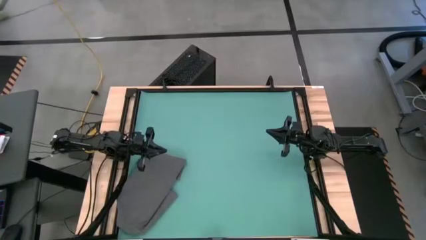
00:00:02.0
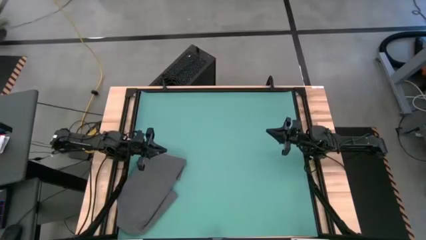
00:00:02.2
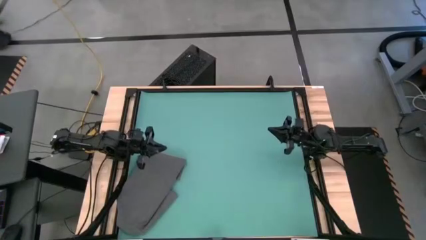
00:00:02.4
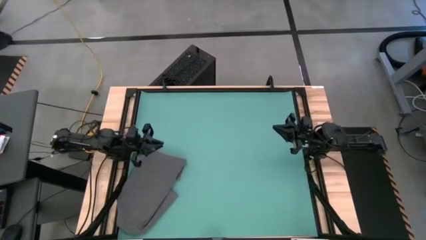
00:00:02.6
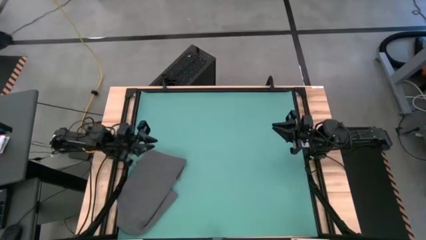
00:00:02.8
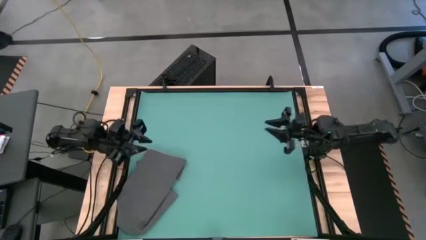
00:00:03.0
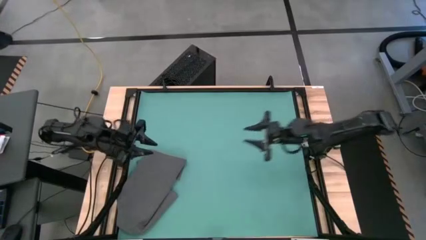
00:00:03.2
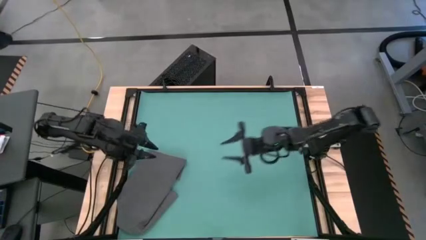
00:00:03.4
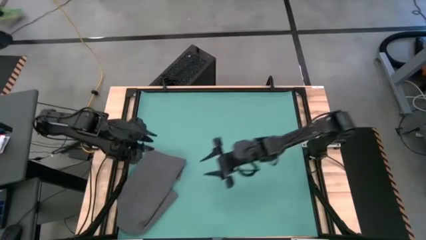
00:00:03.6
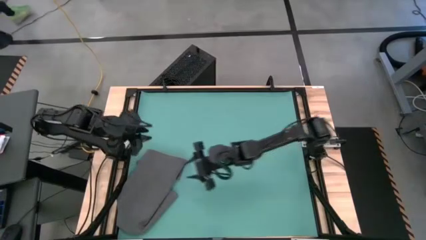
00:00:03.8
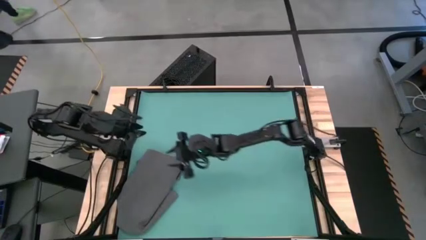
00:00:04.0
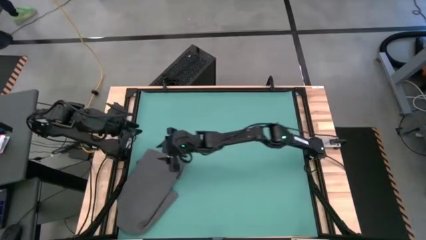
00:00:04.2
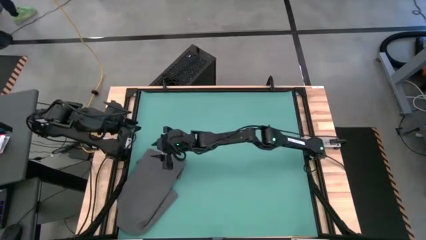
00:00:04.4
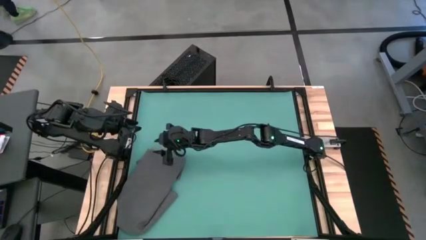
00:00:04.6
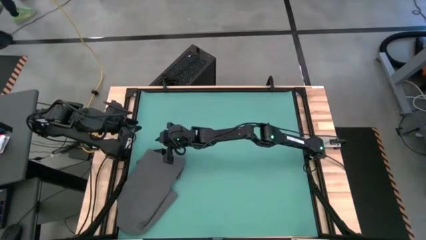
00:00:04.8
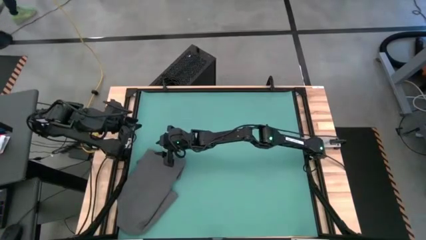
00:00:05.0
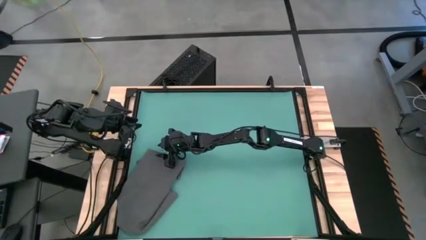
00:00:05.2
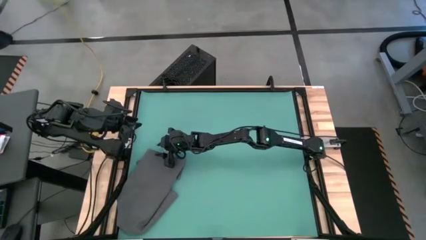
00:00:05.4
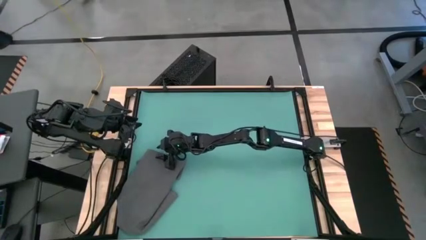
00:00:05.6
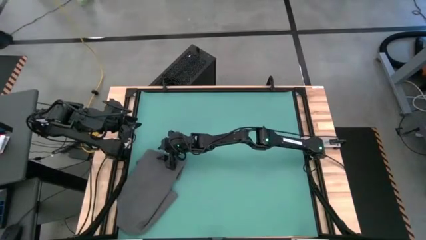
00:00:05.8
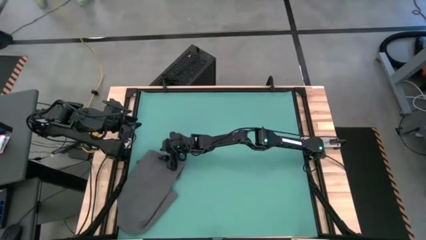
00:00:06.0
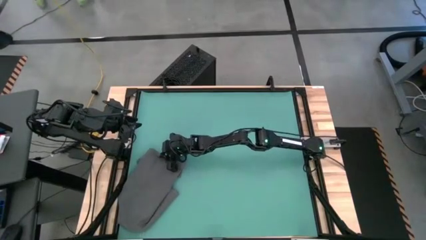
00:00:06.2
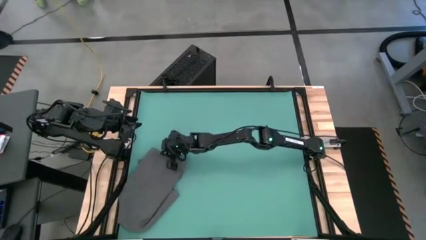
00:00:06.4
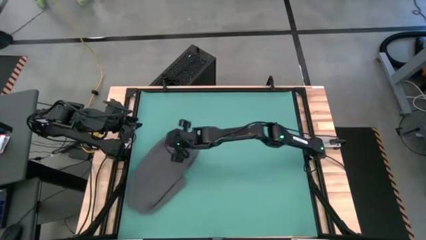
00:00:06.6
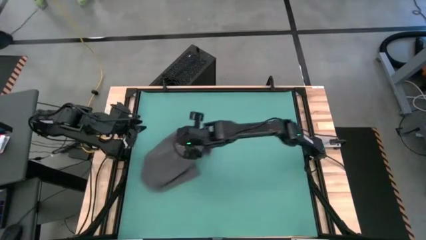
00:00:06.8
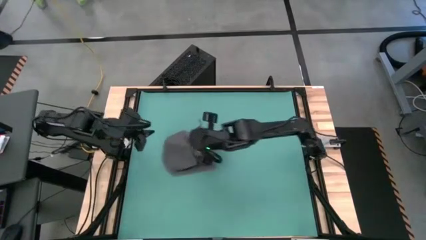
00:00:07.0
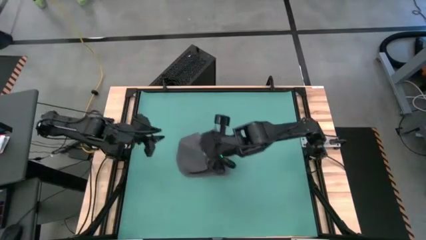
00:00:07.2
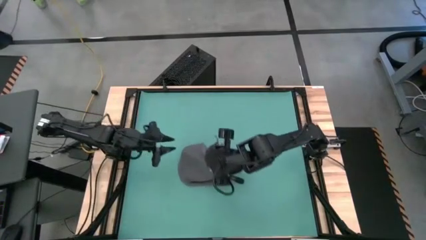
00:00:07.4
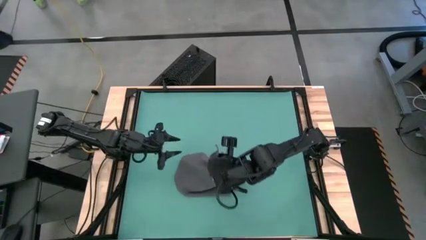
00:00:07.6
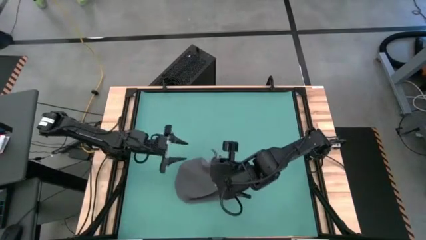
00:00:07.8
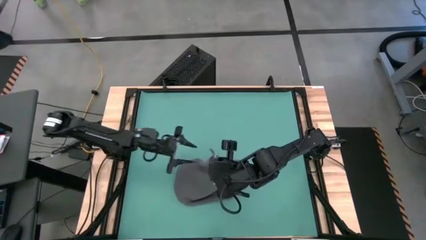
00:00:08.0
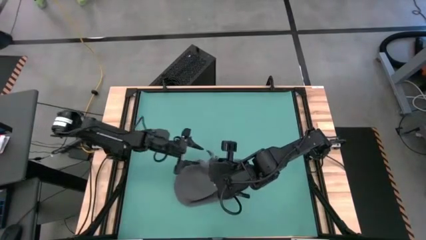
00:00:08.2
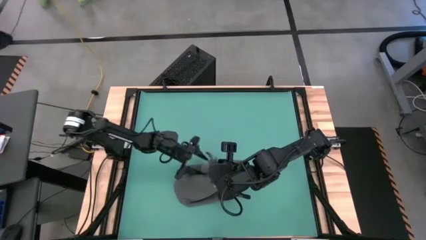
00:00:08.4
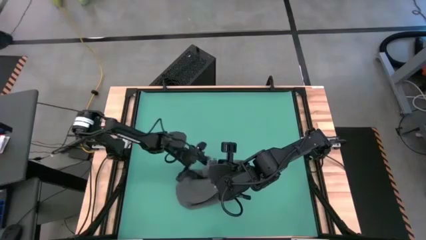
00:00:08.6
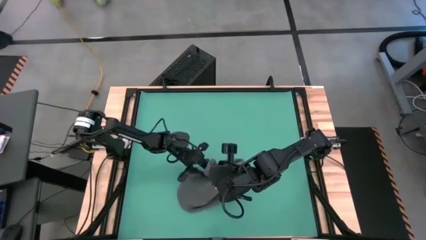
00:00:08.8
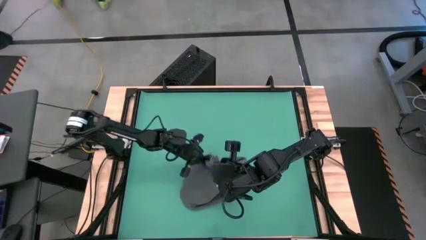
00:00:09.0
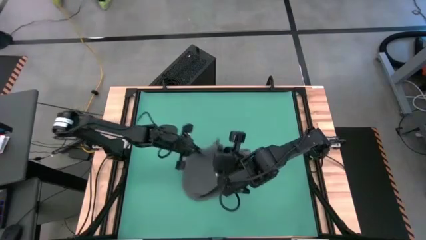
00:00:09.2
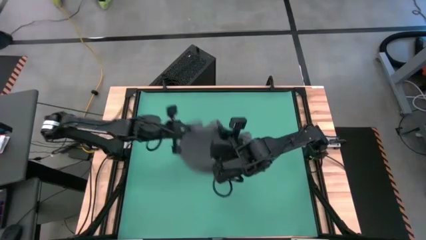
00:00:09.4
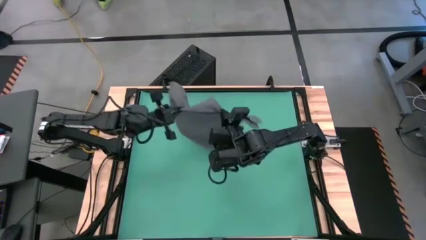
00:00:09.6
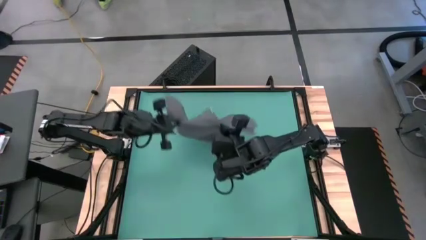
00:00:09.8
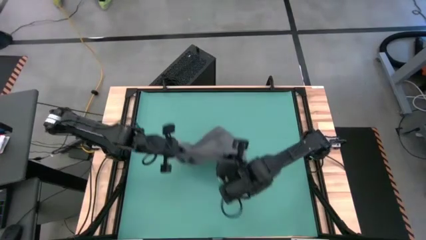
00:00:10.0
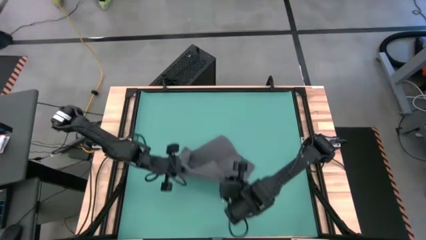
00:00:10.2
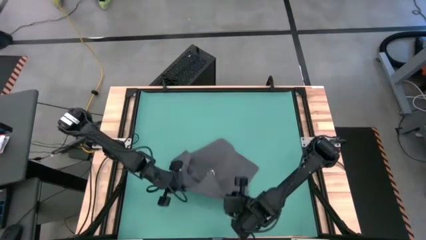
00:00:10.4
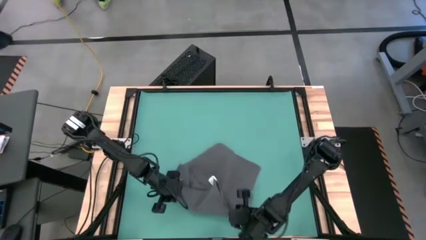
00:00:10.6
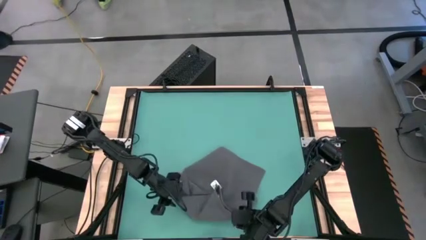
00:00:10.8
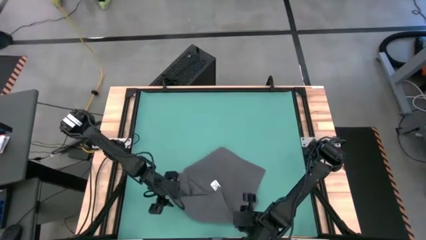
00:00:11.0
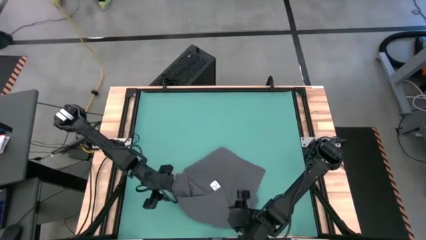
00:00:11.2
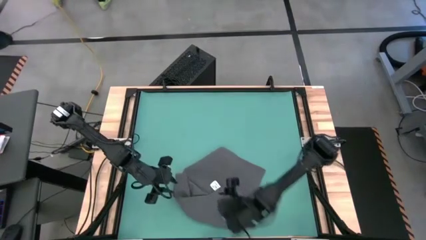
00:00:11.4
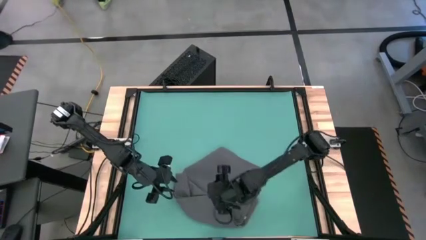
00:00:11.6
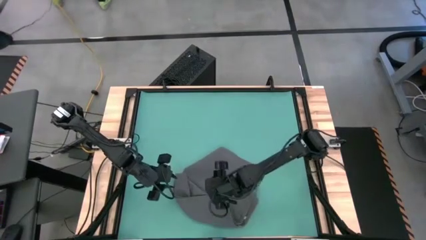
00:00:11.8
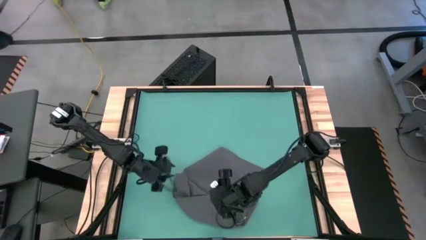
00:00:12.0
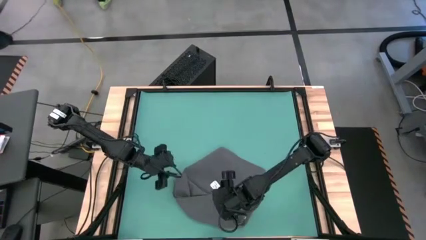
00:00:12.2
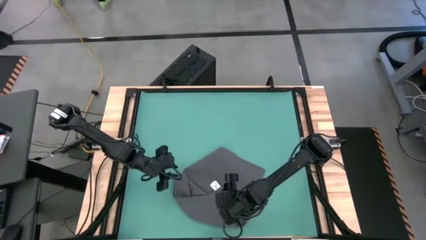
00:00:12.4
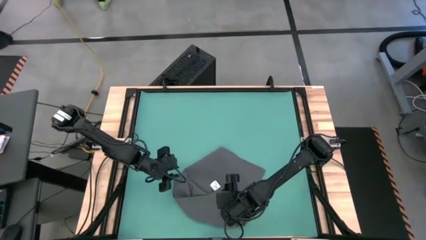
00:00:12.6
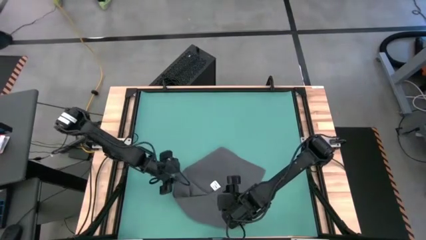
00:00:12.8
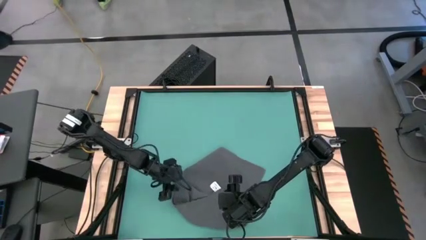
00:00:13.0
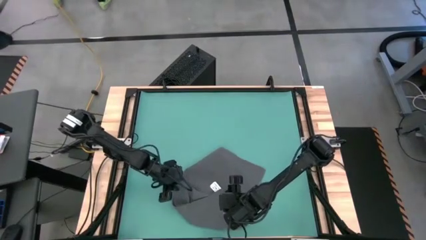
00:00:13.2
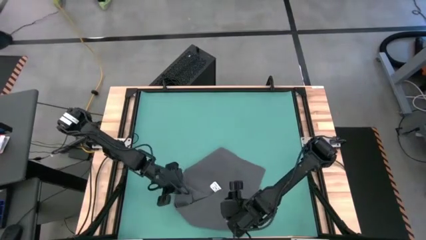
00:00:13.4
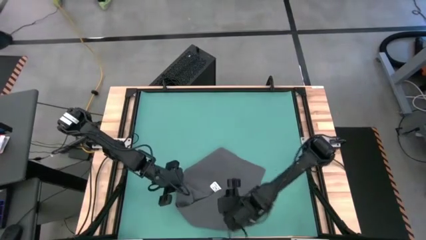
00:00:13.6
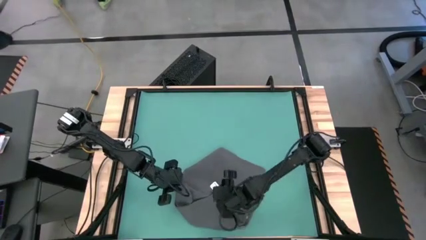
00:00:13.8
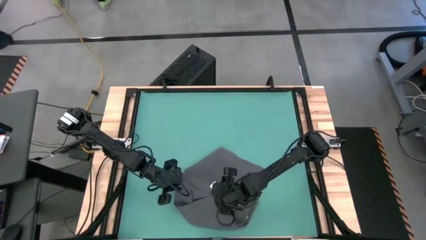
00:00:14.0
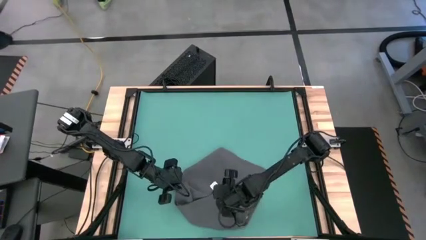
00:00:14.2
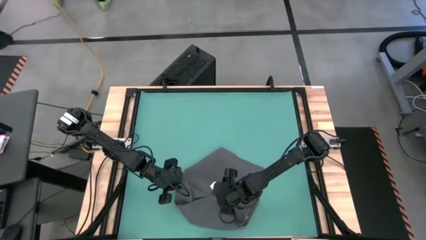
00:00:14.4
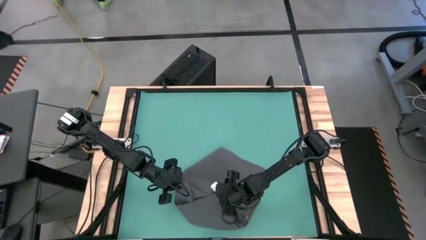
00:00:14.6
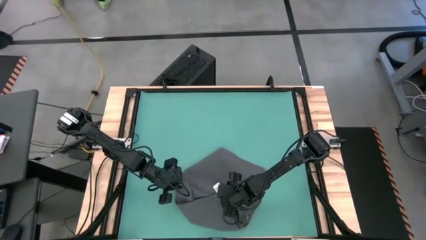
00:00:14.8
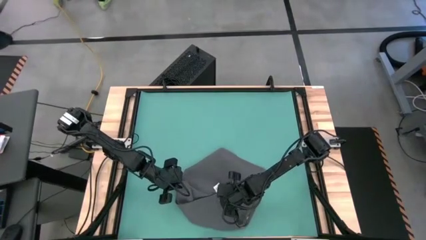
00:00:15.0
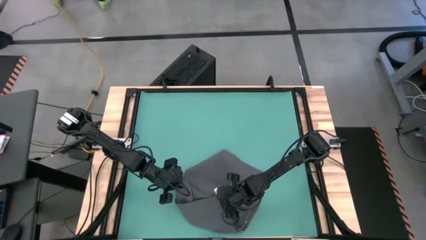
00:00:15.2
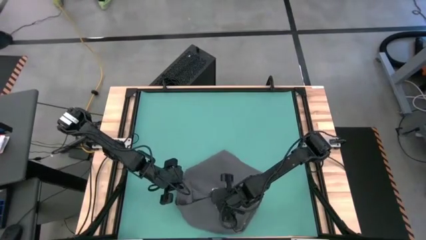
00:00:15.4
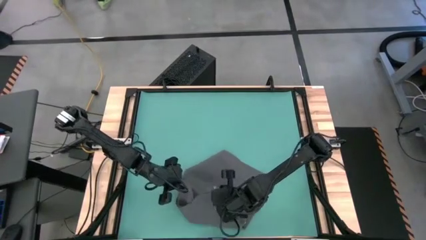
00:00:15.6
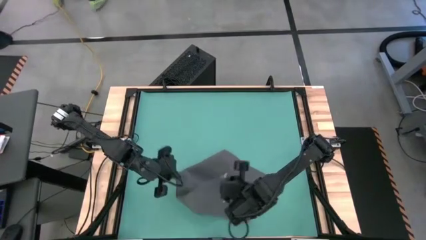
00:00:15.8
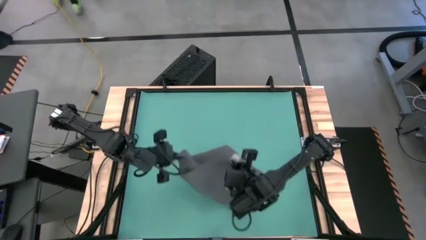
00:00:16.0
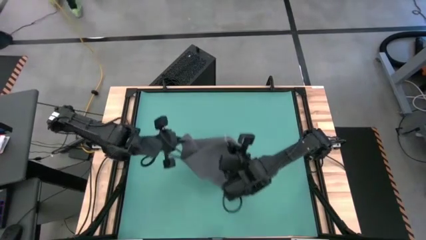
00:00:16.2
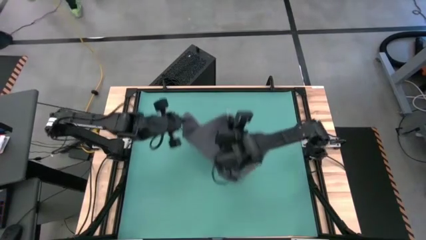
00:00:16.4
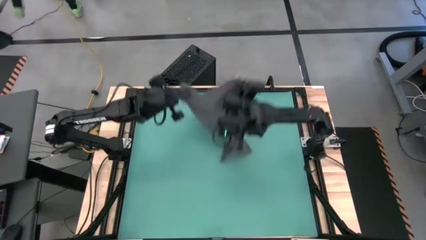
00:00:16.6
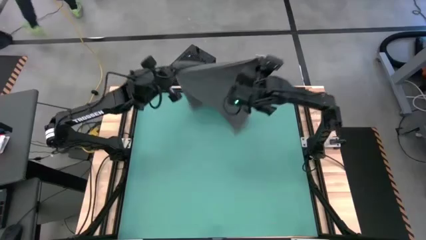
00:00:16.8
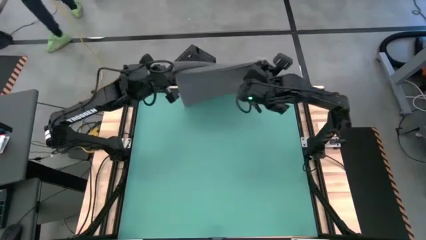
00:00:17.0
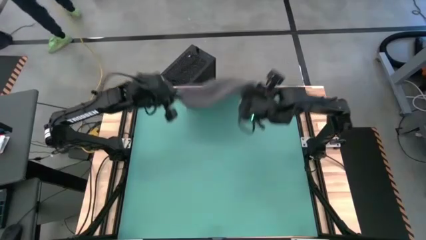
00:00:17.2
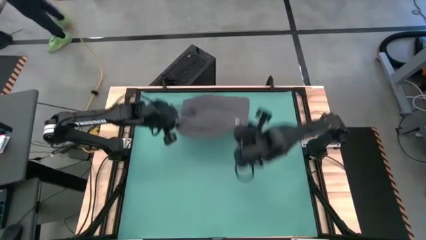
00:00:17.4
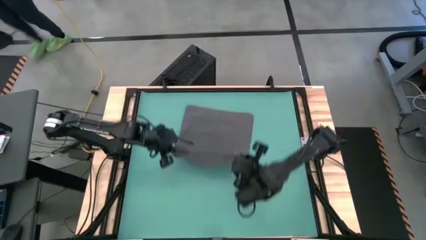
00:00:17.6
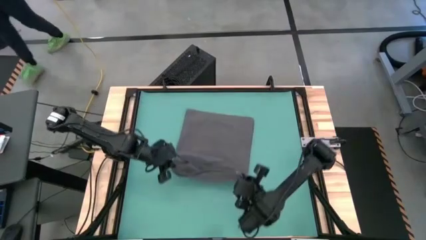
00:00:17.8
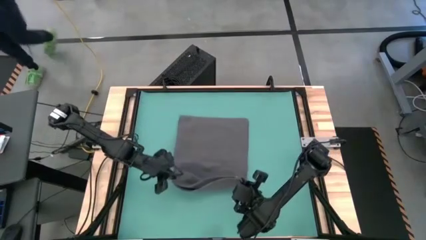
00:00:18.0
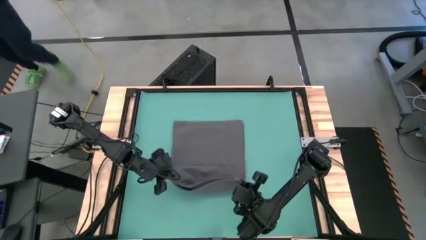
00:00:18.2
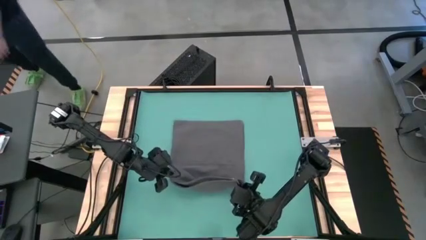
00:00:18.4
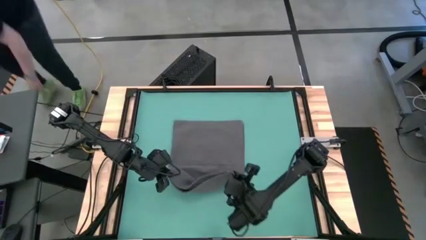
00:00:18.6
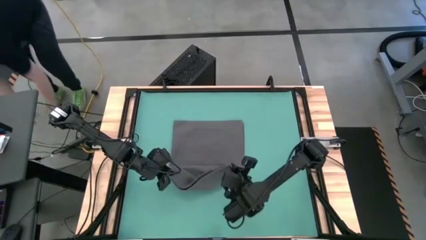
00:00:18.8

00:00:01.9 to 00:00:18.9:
Task: Roll towel into tight, uniform cylinder
Roll the gray towel
